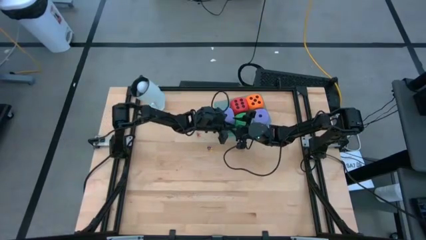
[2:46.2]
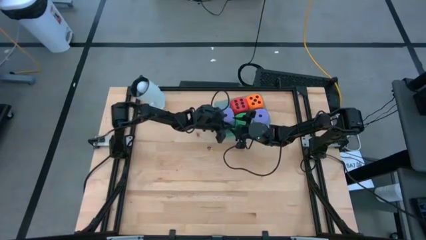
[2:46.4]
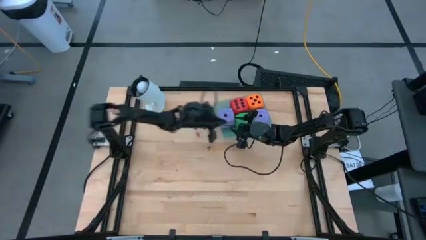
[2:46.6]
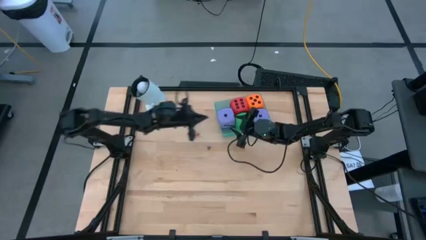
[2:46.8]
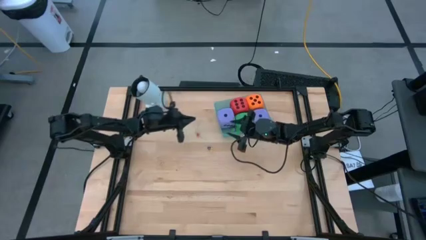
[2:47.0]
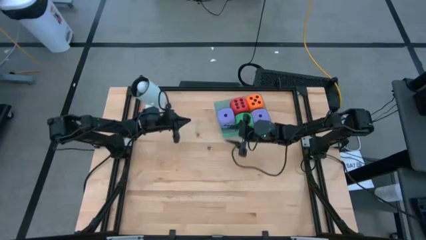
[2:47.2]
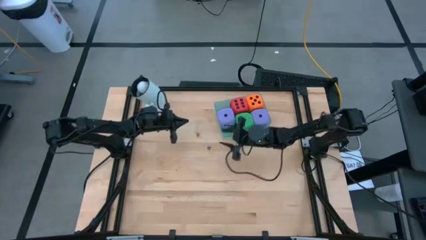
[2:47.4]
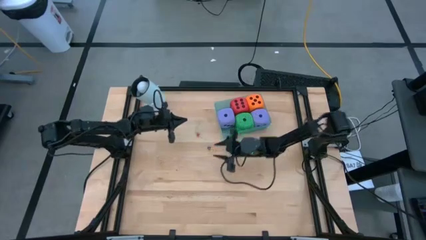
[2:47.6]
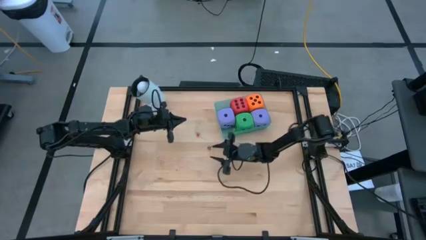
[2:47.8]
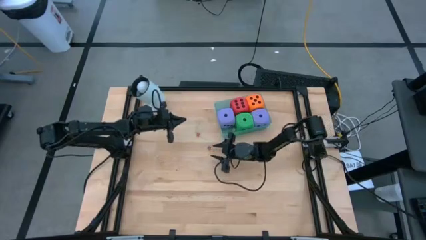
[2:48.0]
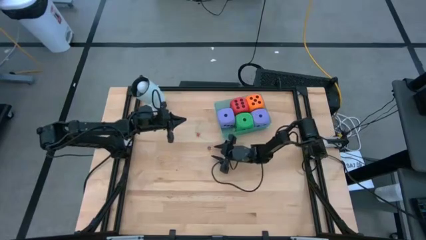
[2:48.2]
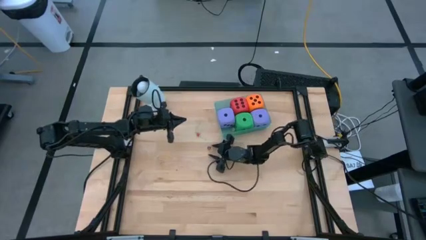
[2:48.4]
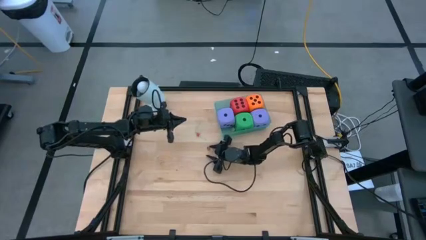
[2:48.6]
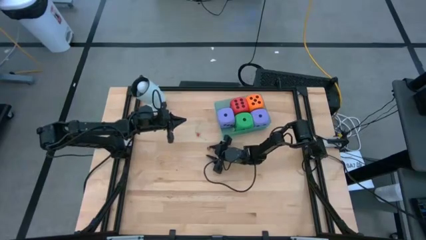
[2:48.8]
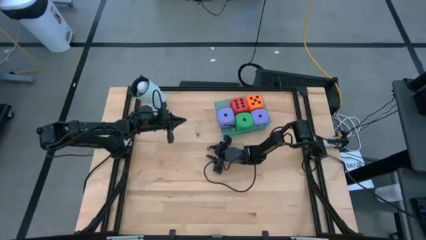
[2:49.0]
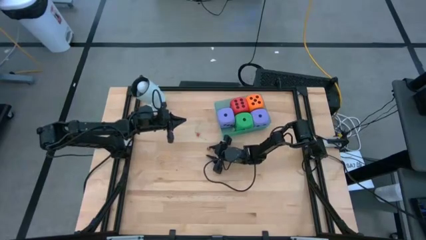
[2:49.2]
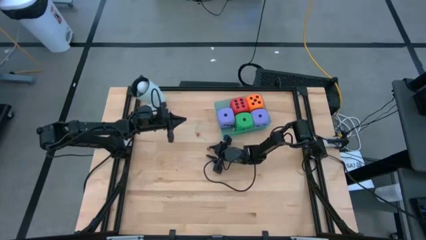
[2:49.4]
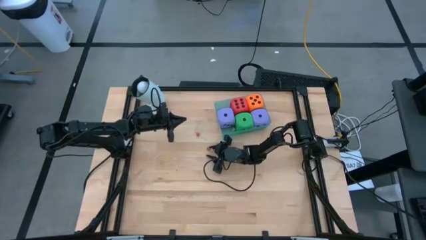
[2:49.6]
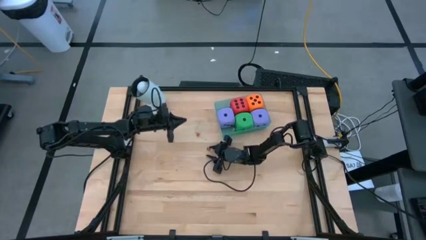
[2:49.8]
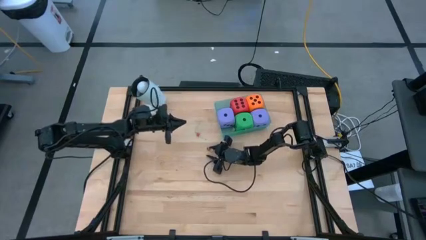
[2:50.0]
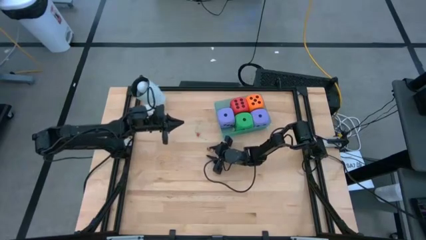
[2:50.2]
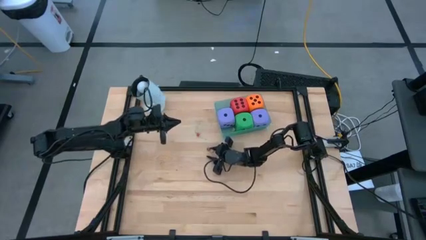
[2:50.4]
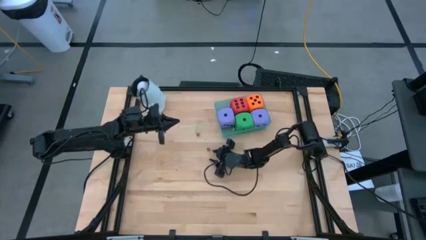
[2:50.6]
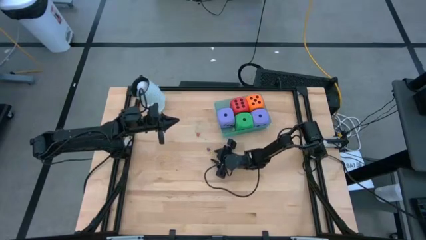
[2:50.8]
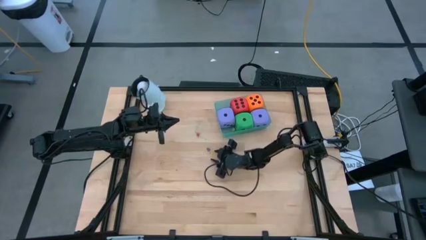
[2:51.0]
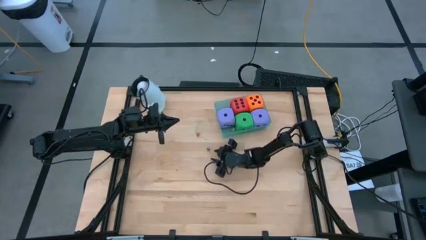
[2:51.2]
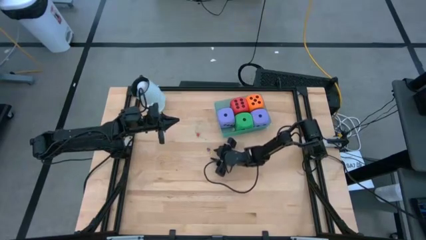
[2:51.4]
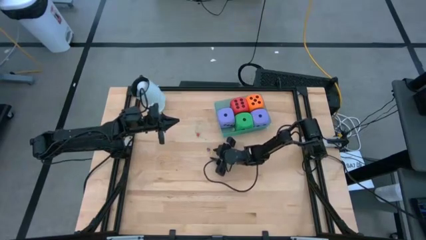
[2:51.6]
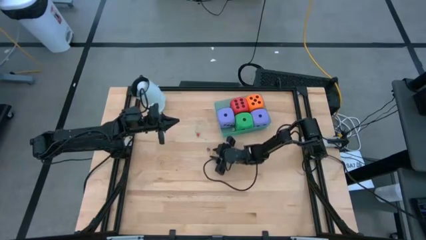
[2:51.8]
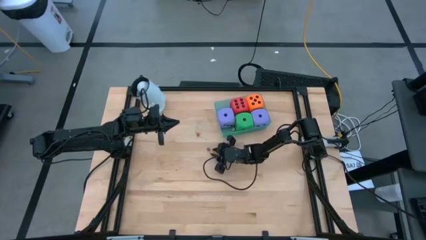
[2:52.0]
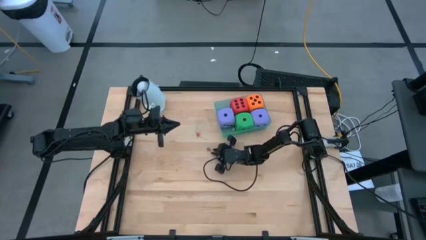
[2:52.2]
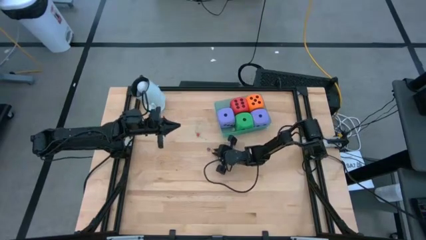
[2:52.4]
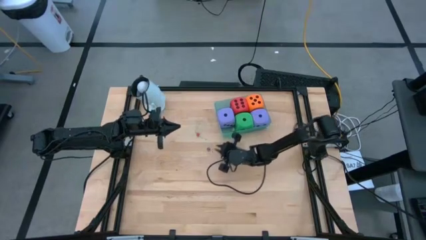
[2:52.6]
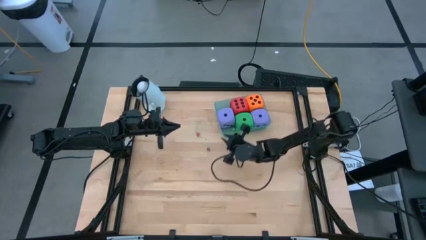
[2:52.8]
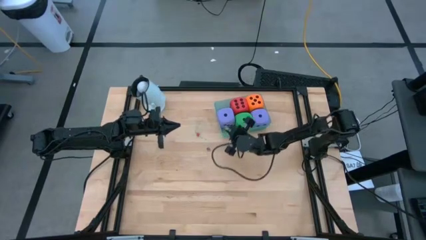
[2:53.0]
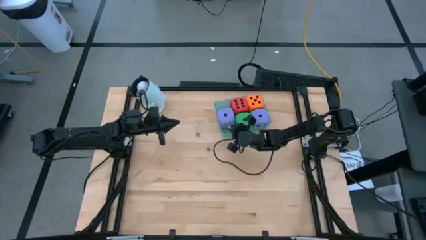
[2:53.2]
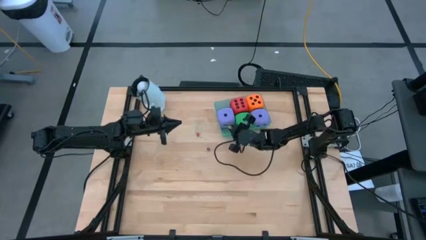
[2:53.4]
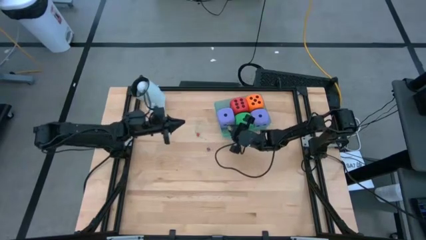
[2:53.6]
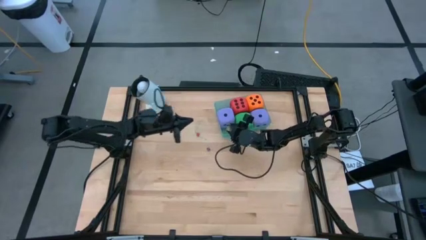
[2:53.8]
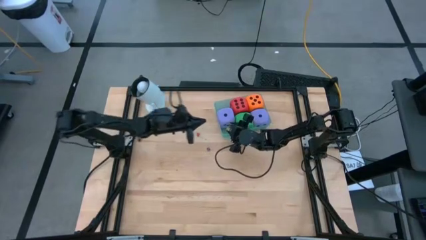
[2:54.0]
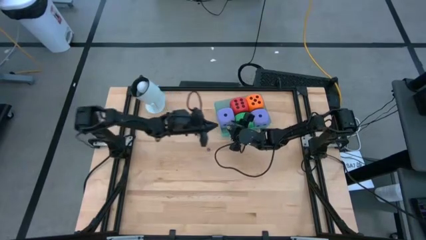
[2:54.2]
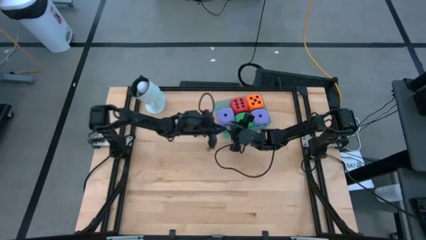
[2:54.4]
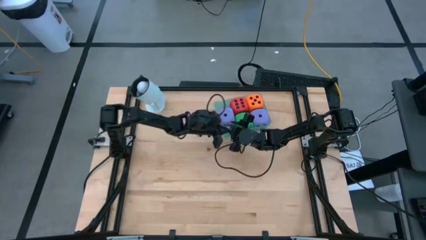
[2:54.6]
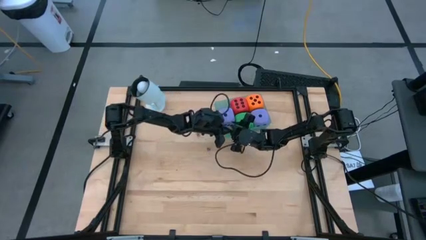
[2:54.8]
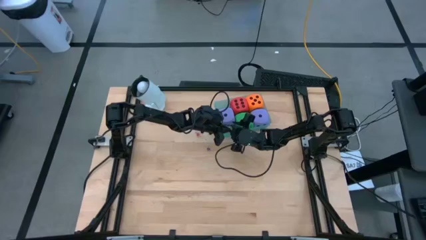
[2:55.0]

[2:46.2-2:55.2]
Task: Pick & Place Dice
Put the small yellow dice into the bin

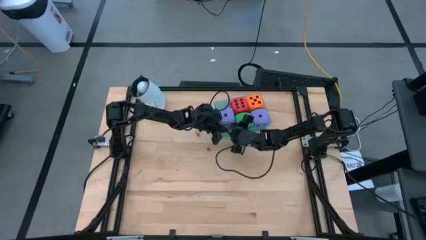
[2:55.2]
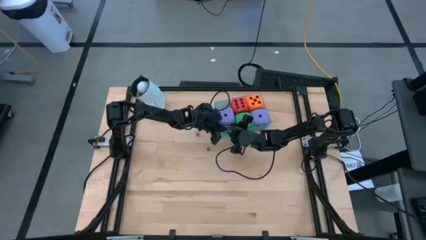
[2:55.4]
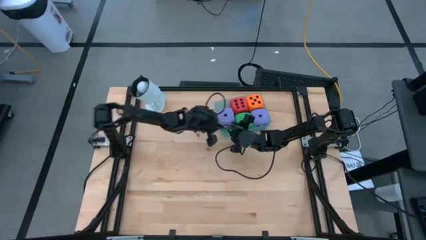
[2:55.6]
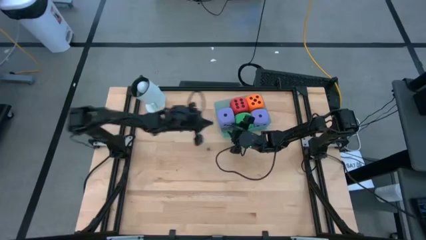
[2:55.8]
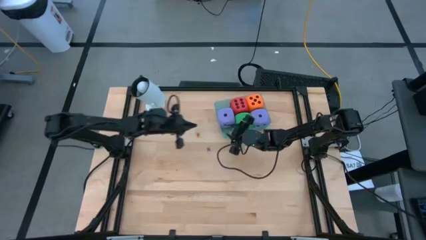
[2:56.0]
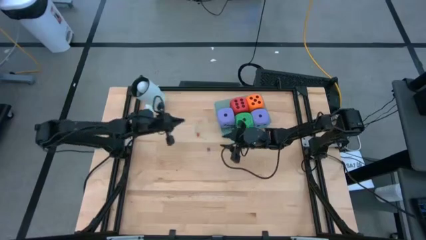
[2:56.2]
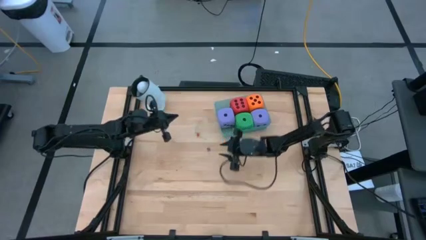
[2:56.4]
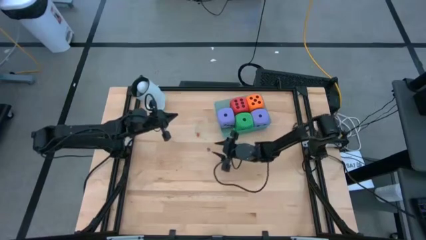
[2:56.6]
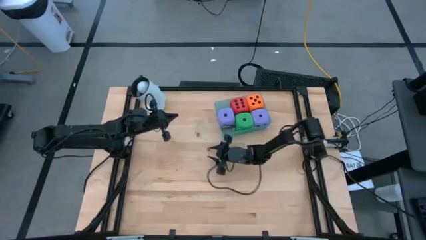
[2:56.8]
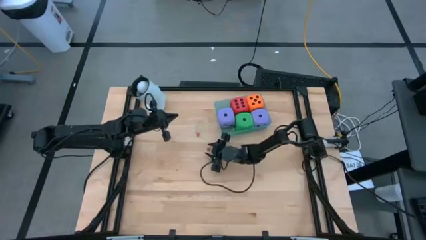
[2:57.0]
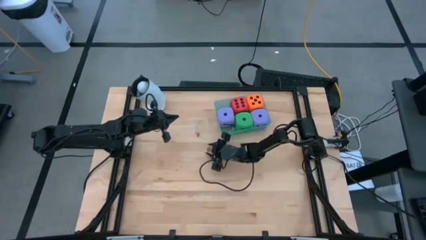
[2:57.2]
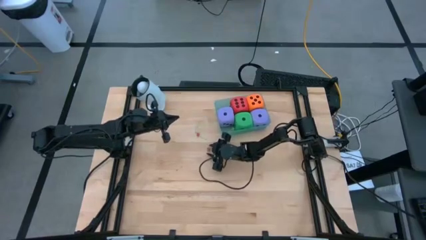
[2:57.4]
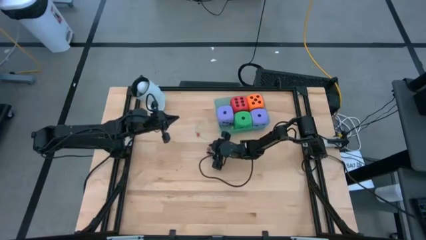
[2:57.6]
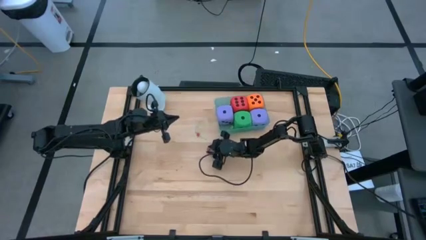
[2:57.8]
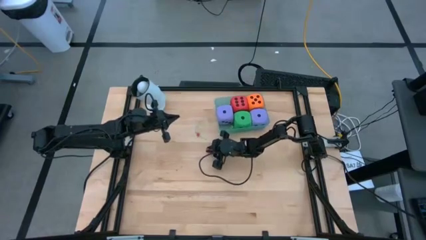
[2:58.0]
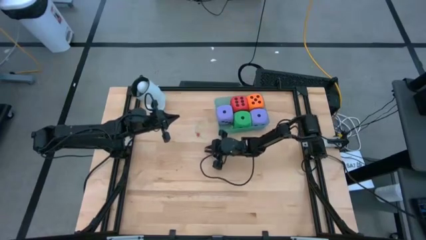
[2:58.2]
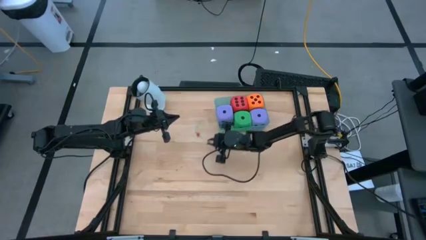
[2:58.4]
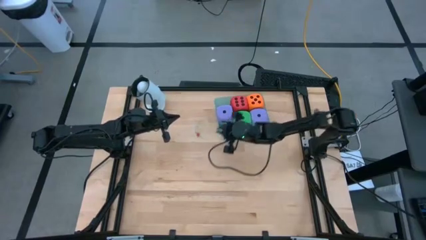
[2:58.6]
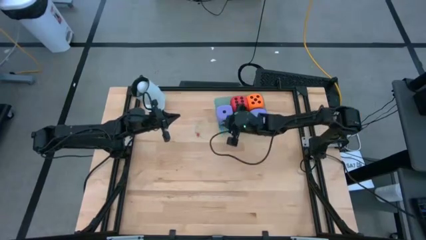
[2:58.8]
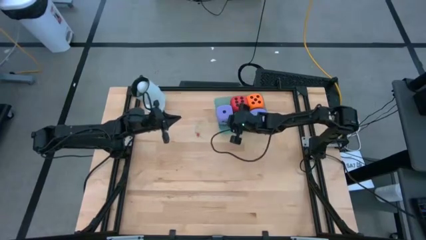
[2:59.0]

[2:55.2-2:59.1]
Put the small violet dice into the bin

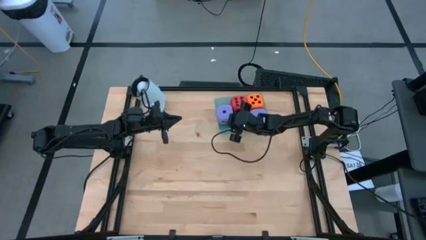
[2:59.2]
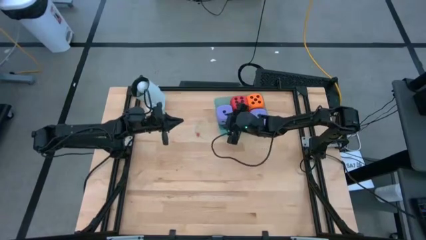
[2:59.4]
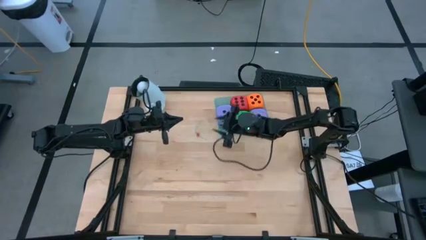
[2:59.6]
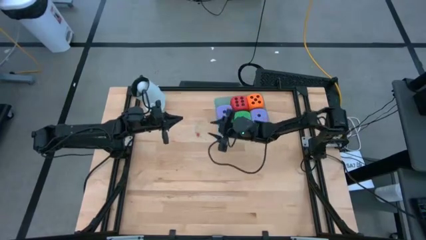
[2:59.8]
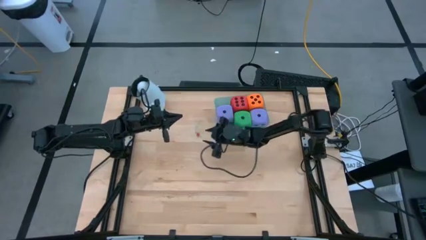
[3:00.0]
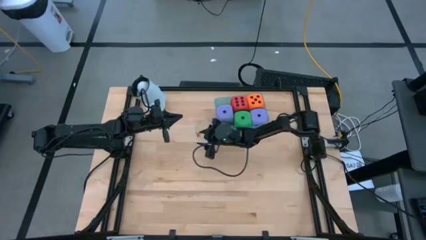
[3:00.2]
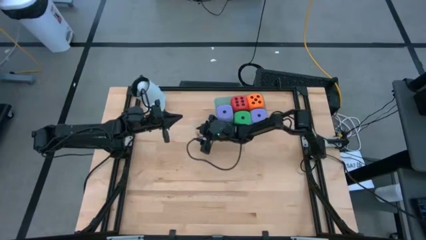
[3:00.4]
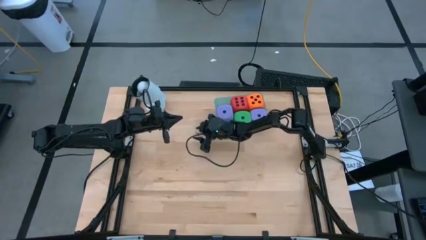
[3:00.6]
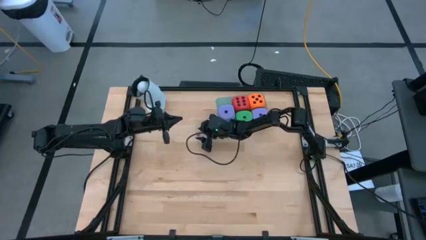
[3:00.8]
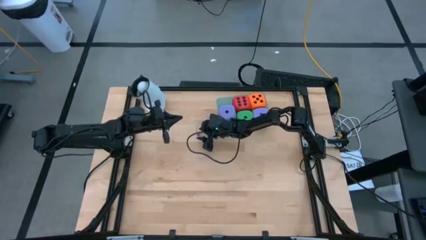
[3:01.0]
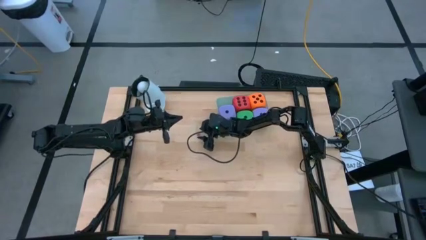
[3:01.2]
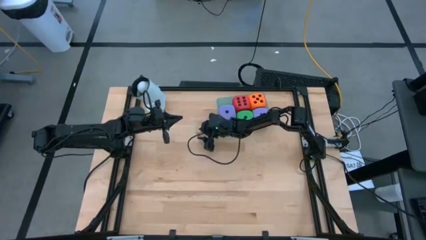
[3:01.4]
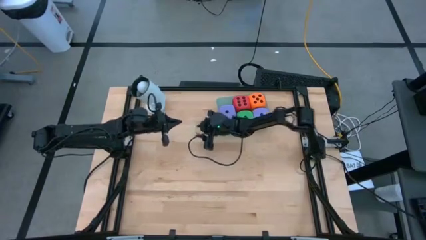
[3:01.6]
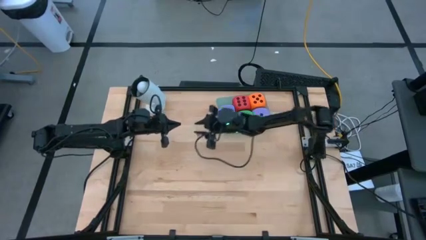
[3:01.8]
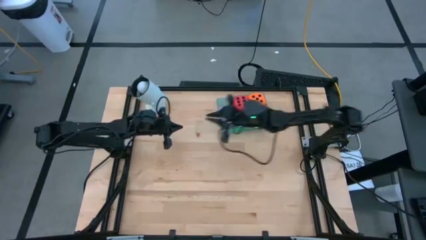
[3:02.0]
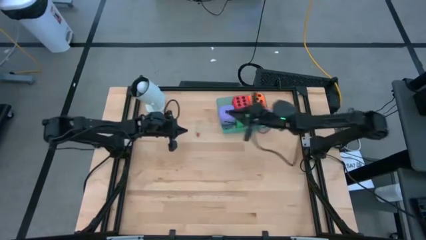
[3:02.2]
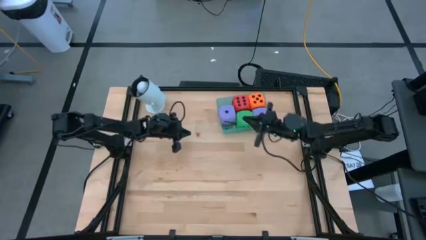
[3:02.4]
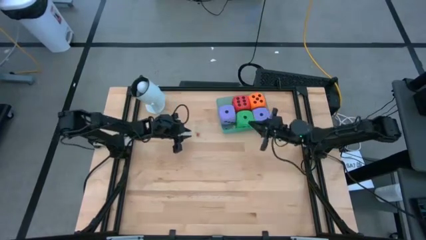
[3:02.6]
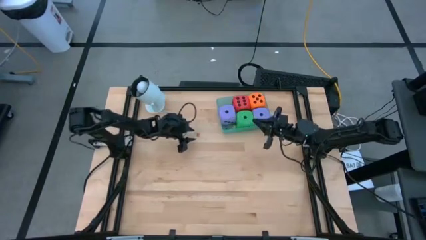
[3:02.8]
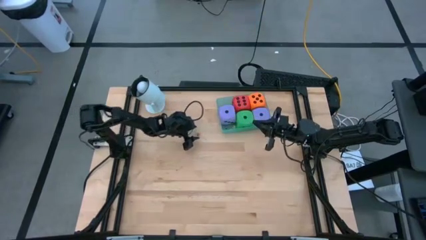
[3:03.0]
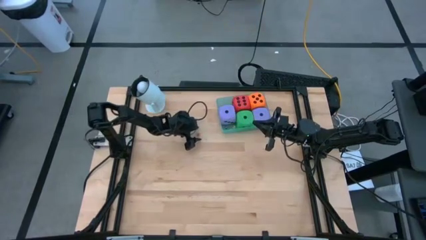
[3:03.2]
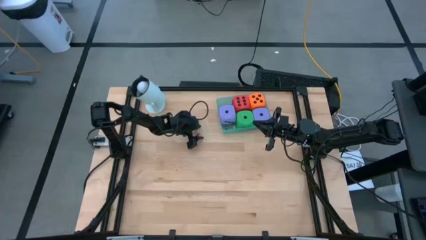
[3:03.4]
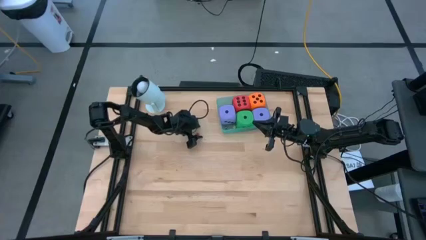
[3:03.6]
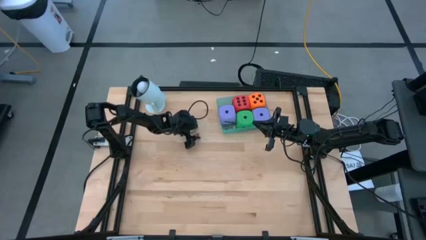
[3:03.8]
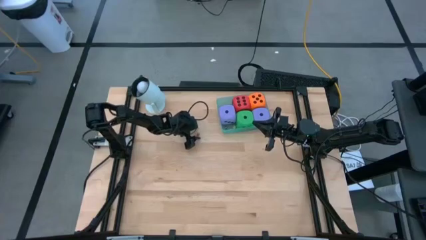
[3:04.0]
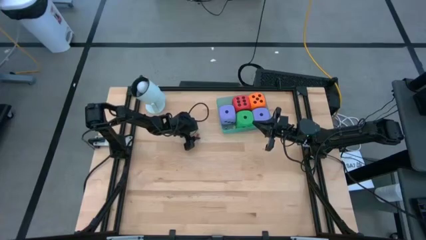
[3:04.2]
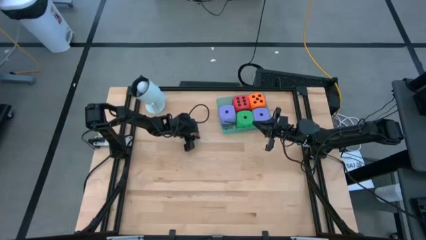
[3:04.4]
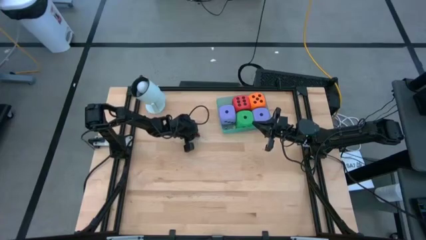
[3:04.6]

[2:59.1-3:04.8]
Put the small red dice into the bin
